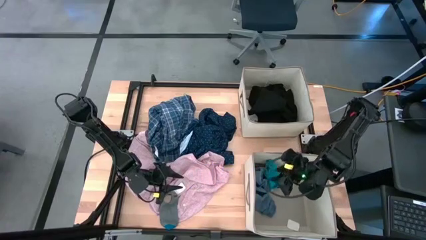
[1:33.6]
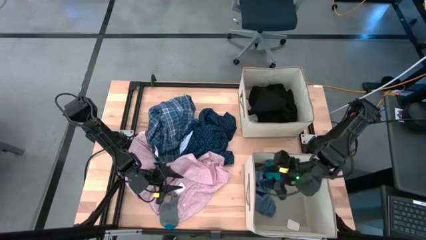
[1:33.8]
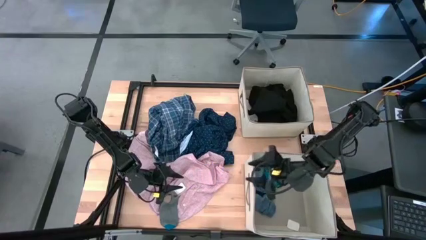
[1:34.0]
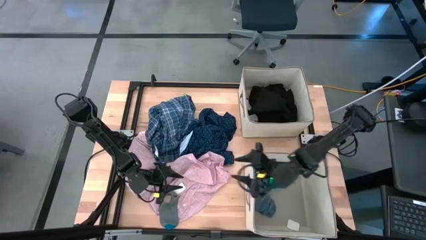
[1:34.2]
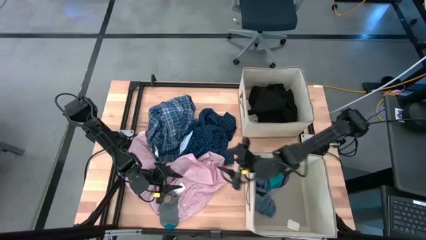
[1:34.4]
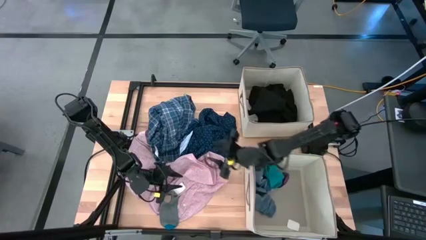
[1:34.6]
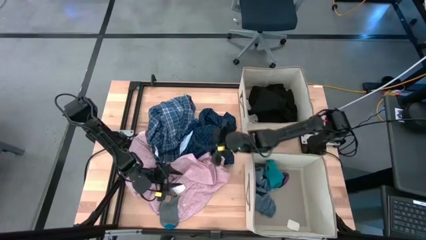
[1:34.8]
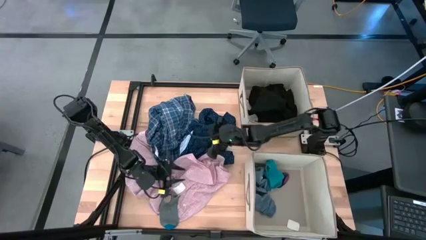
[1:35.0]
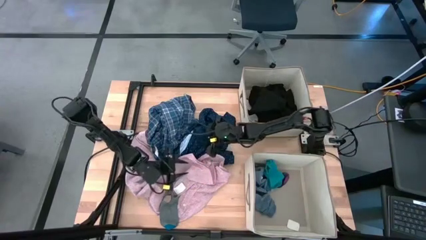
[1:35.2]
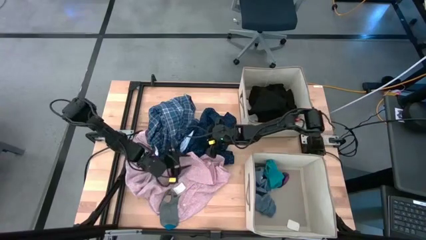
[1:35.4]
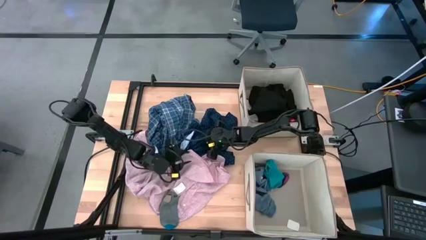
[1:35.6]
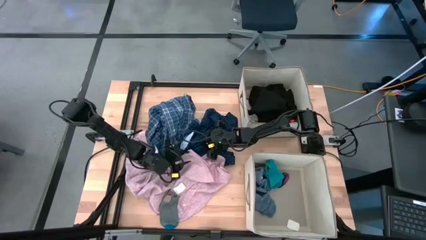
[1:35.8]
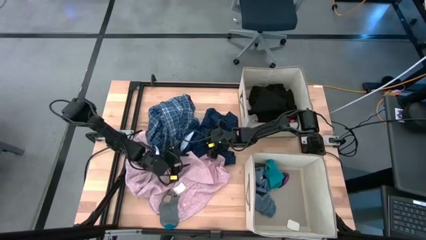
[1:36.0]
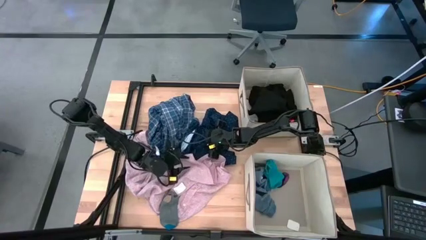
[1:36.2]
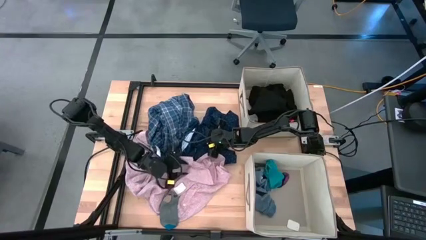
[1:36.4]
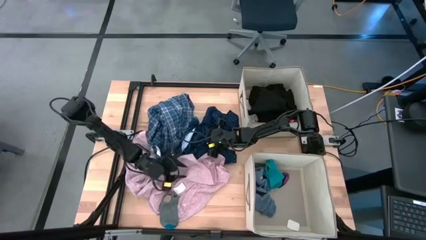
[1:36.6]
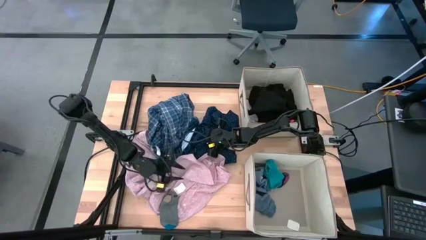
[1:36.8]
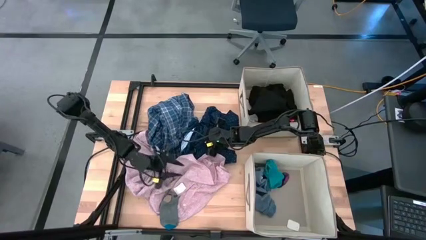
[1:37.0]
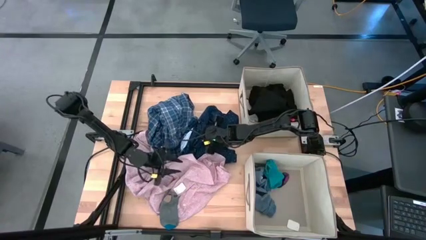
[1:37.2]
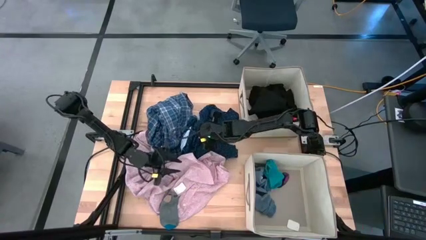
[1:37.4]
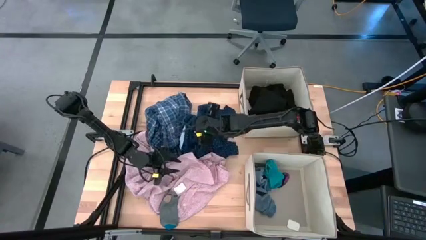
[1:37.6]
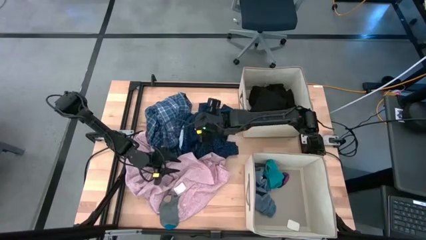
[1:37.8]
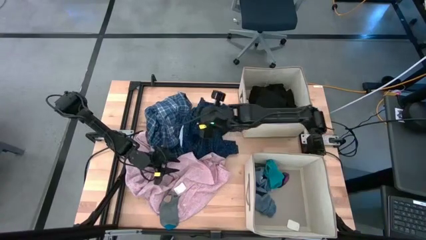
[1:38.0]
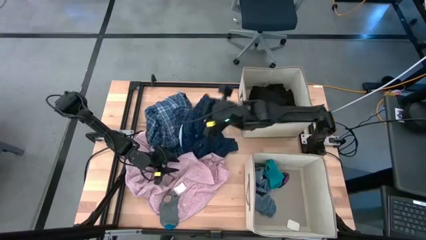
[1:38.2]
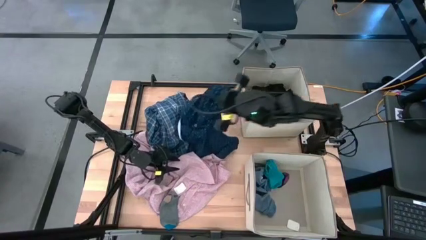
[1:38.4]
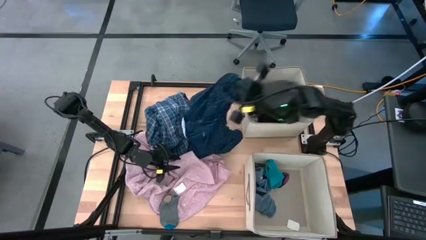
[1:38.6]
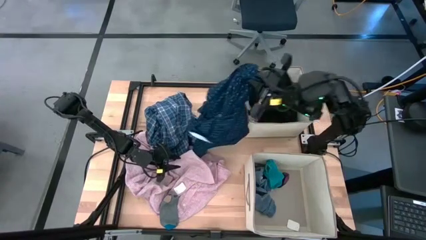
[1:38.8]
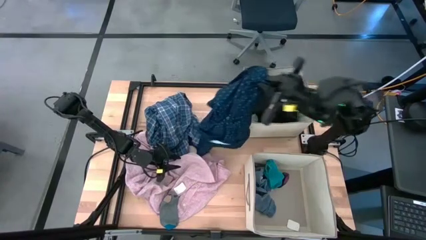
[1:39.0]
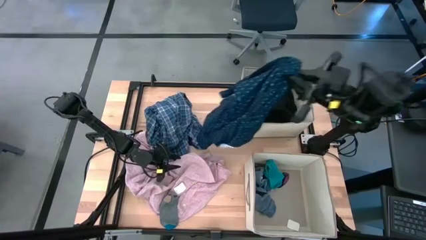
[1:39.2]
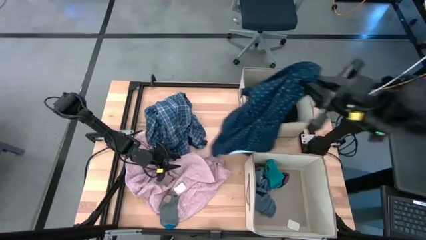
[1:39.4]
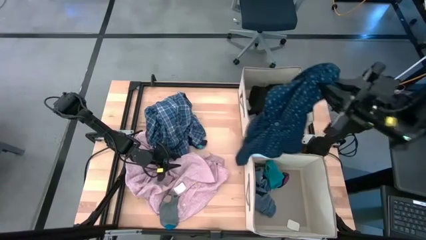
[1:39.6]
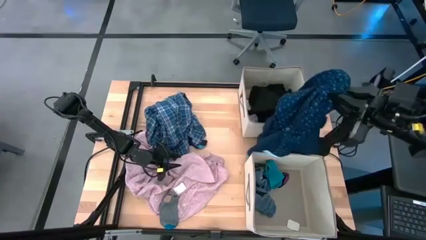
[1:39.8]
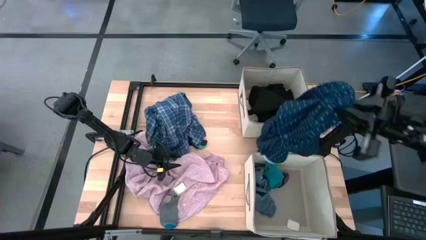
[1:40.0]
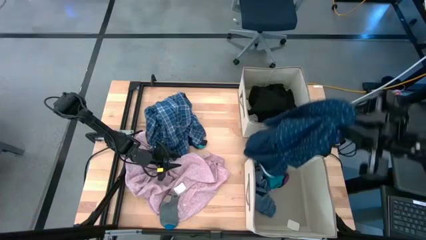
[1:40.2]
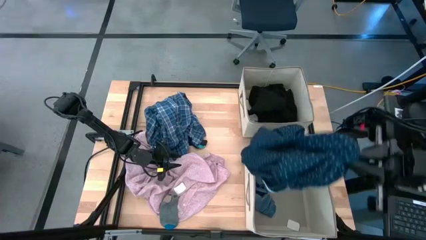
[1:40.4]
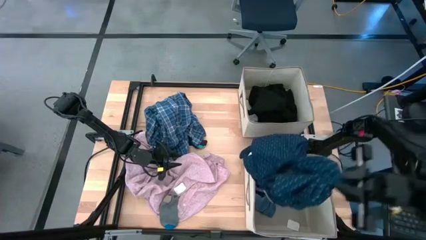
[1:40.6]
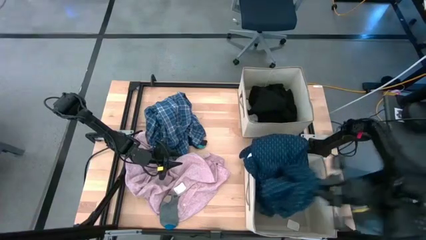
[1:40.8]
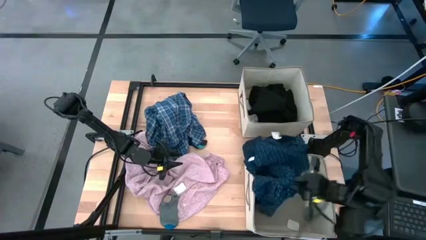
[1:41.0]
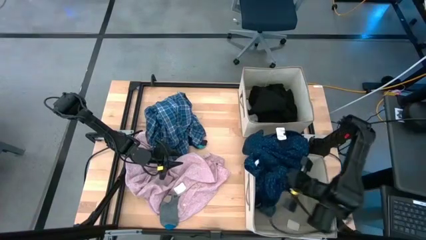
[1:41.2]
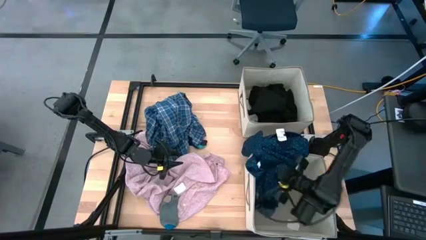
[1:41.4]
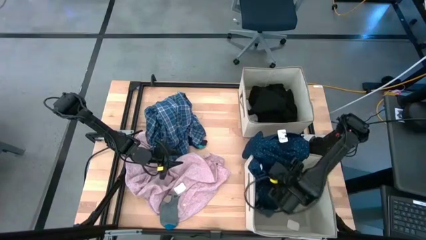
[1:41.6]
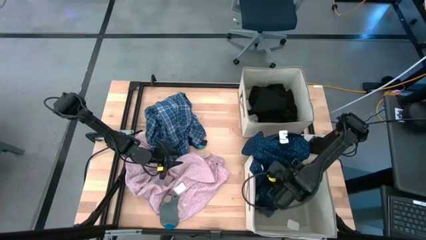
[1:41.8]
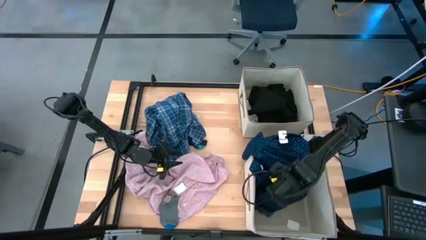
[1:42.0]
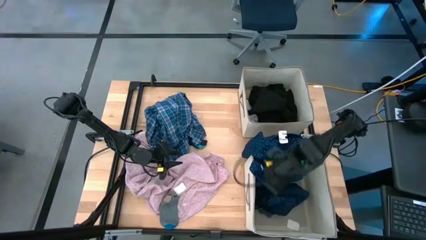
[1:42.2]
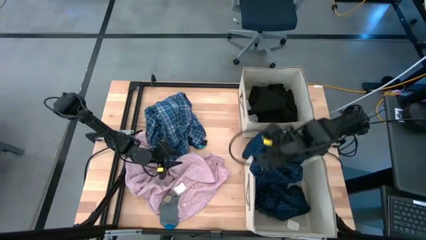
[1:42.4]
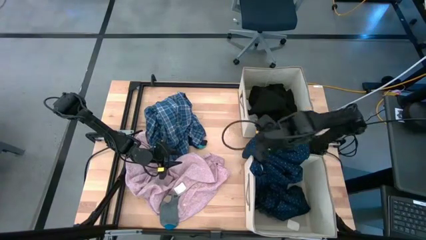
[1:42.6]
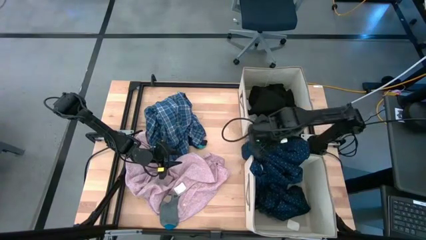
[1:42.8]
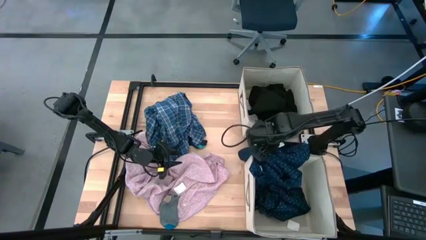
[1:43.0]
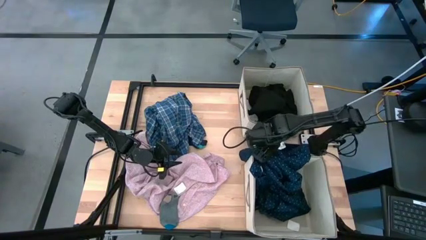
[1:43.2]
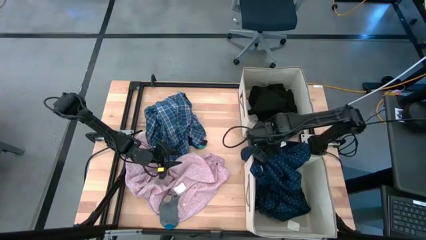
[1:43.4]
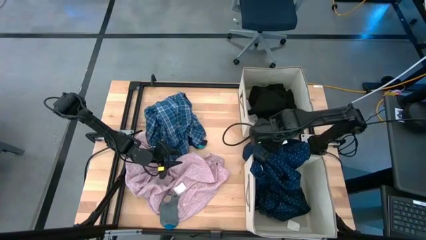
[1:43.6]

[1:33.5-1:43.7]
Task: Sort clothes
Put the blue patterned polo shirt into the bottom laundry organizer

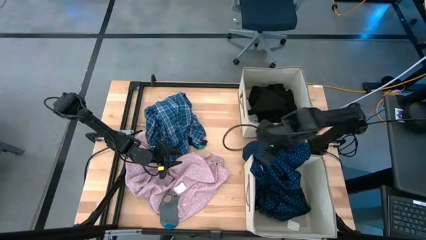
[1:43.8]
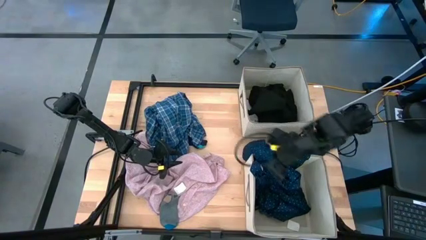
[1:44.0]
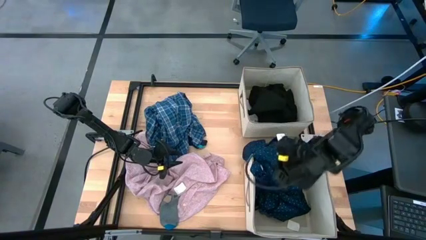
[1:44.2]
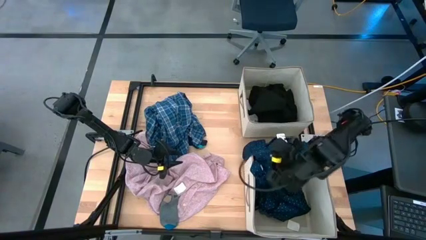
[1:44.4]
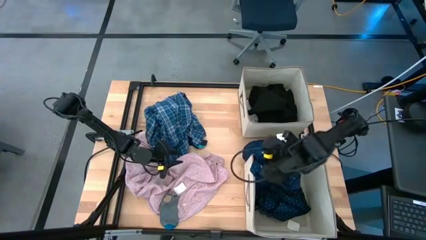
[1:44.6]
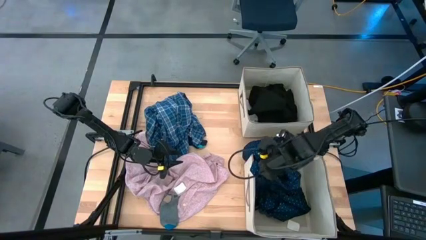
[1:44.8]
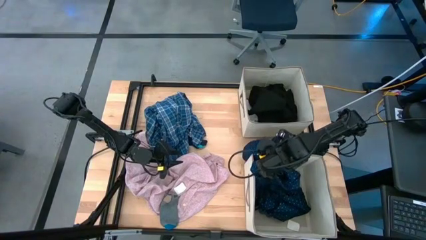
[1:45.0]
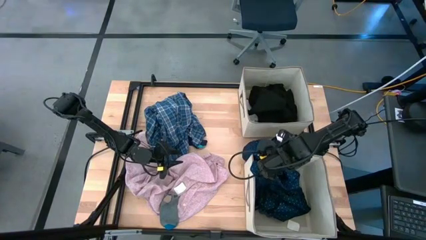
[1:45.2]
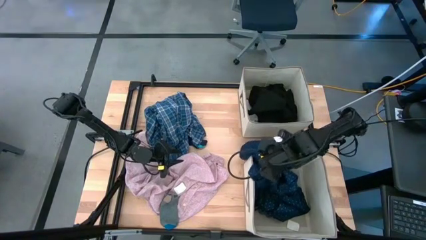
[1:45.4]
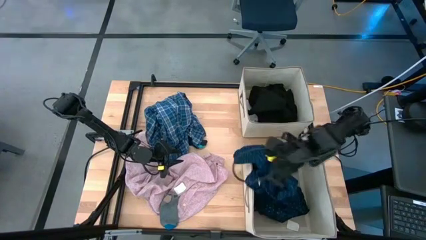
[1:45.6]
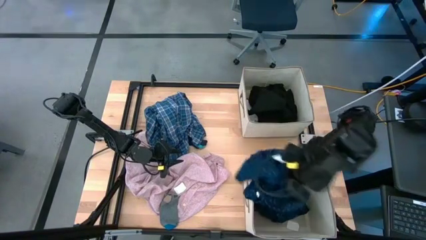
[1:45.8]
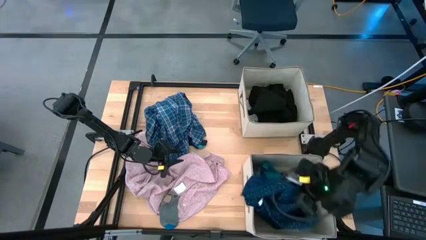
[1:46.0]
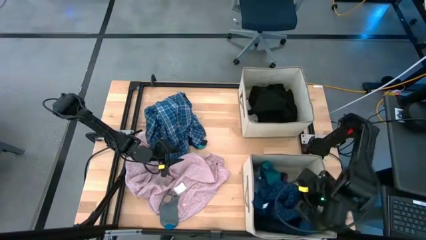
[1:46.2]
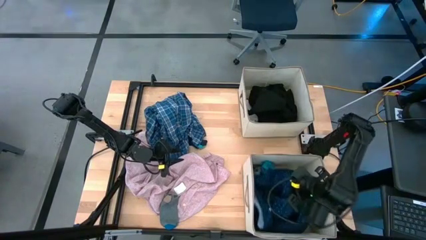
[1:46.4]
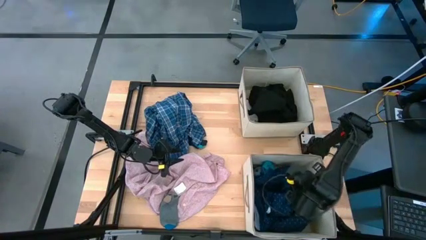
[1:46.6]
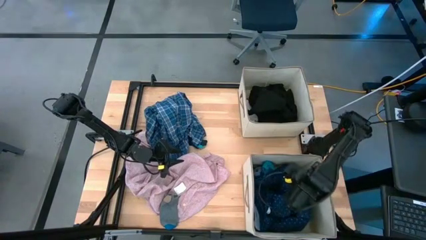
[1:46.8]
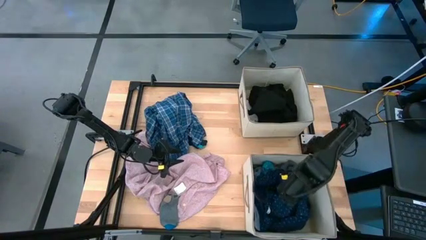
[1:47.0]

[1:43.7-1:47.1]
Put the blue patterned polo shirt into the bottom laundry organizer

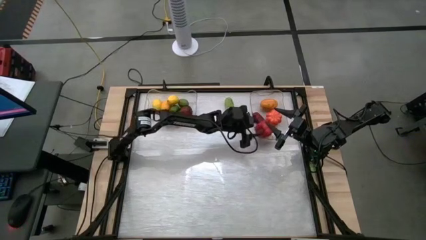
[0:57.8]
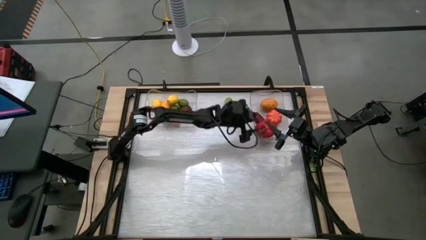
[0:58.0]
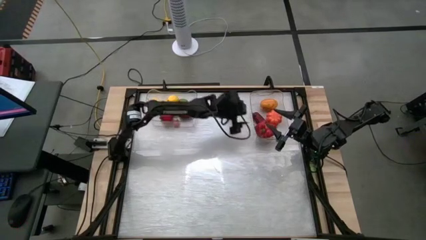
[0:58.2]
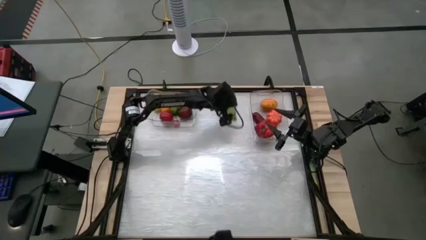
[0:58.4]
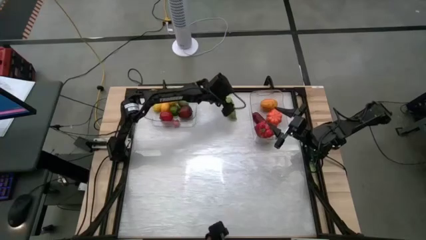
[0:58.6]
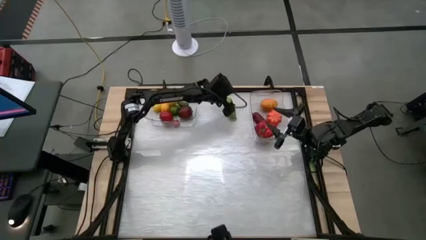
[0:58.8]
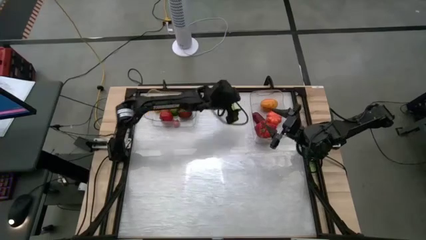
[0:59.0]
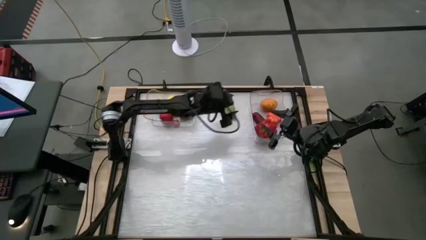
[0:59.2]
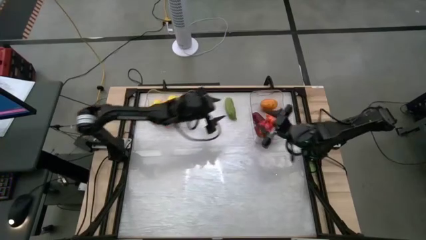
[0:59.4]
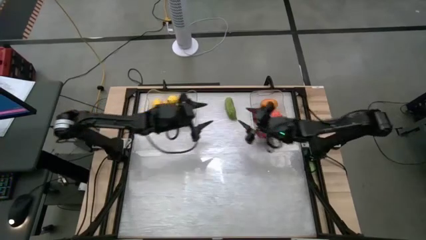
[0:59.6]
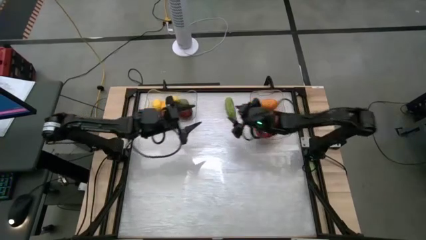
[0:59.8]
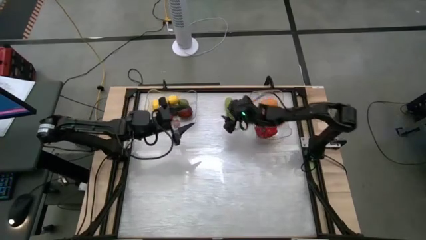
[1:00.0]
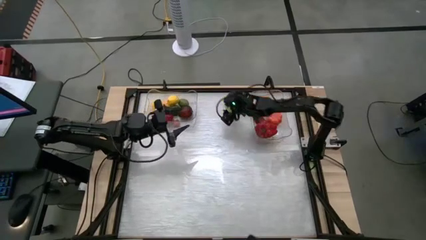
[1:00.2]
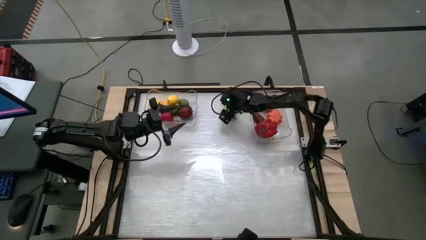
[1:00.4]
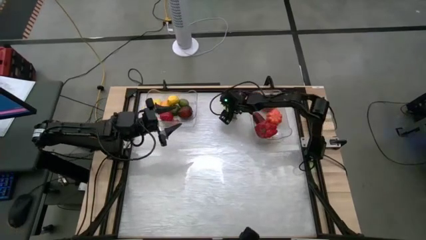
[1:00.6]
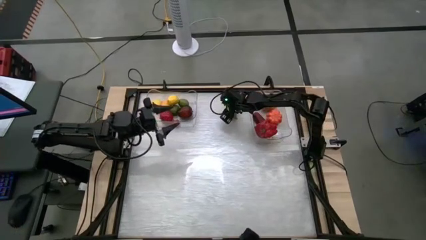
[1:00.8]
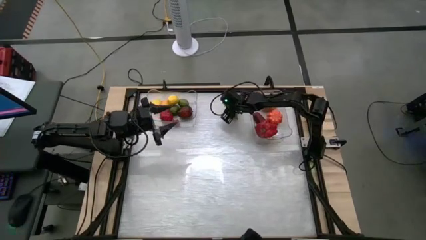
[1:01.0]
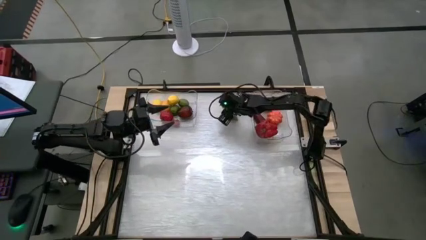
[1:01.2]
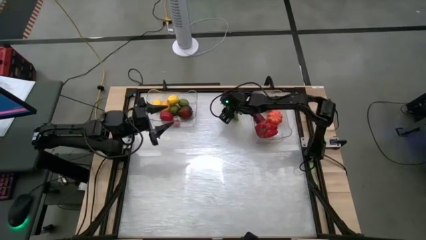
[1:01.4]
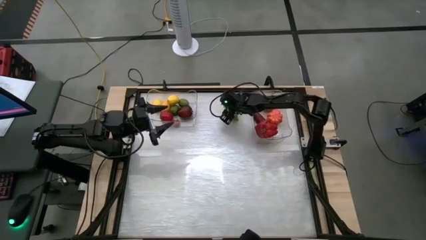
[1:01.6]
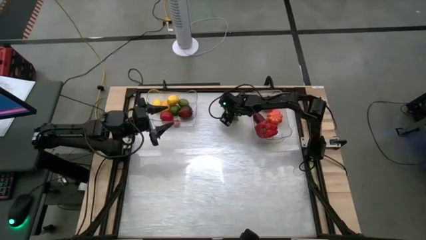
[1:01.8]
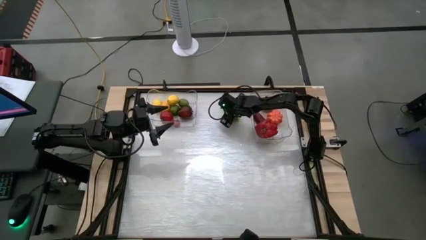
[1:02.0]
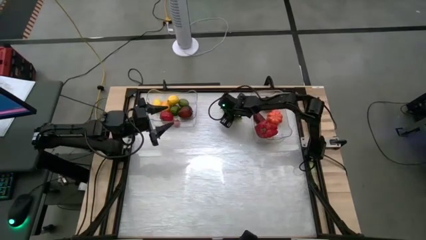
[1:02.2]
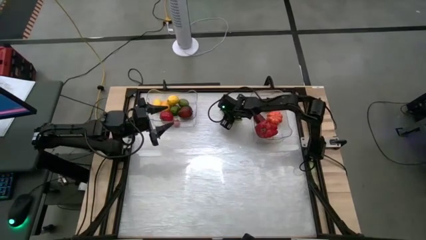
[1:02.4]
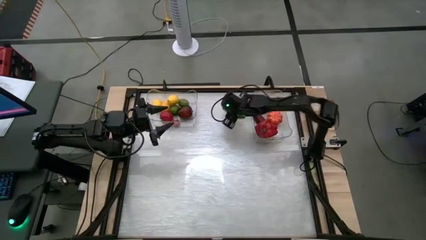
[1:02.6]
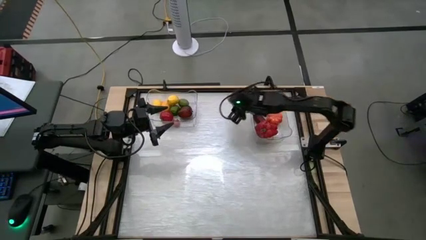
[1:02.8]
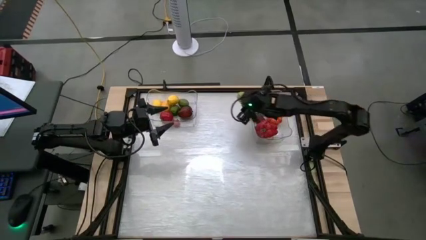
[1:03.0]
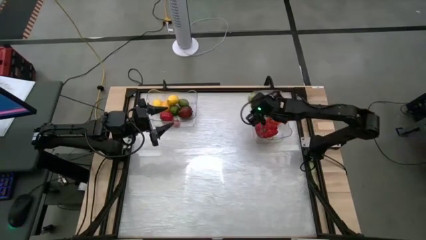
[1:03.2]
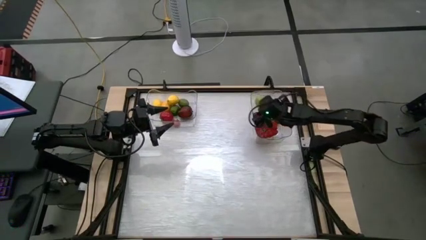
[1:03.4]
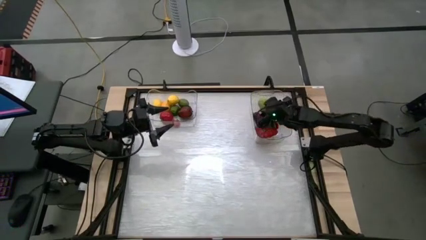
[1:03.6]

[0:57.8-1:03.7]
Task: Sort produce into baskets
Put the red chayote into the right transparent bin
